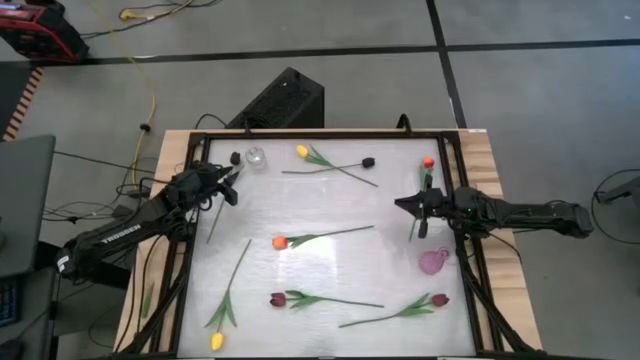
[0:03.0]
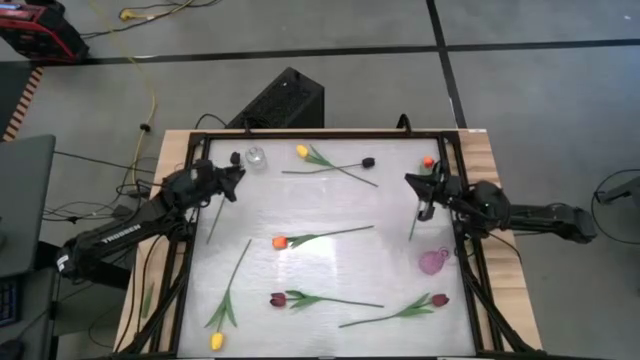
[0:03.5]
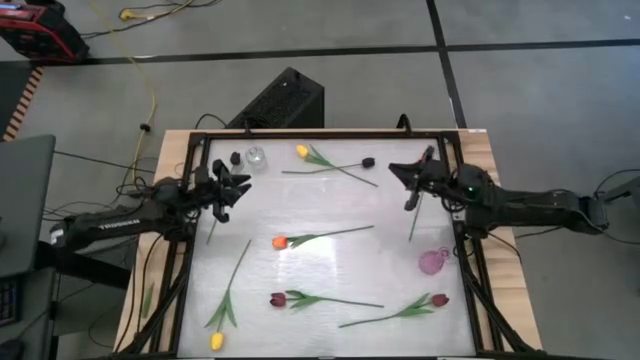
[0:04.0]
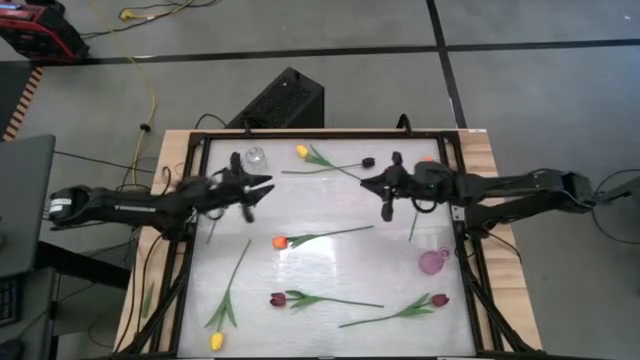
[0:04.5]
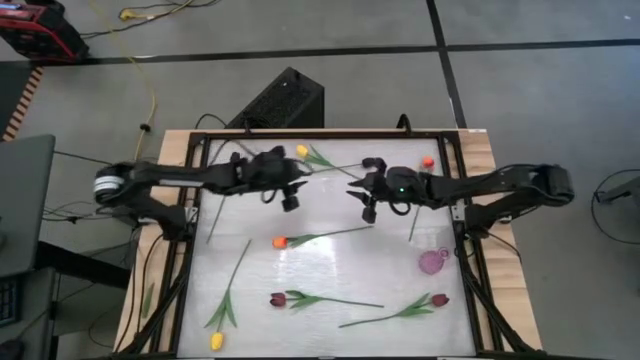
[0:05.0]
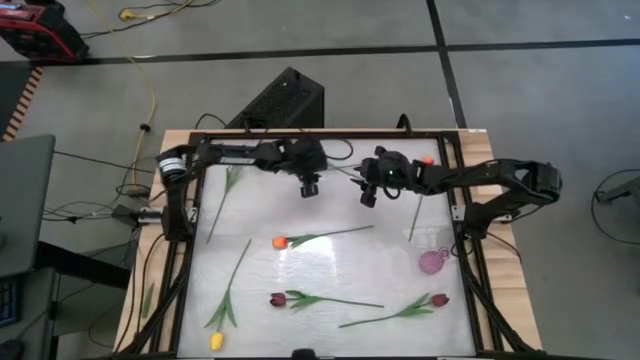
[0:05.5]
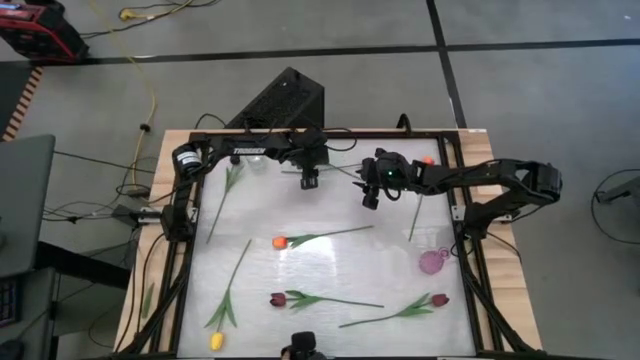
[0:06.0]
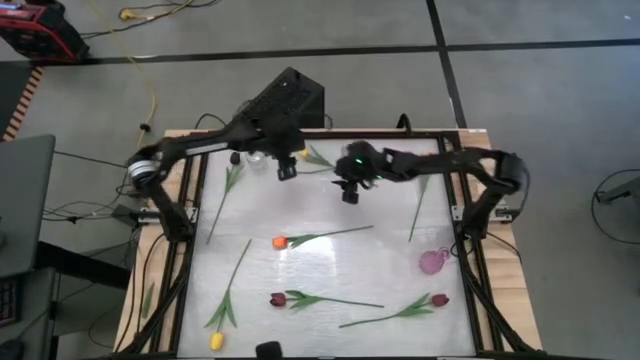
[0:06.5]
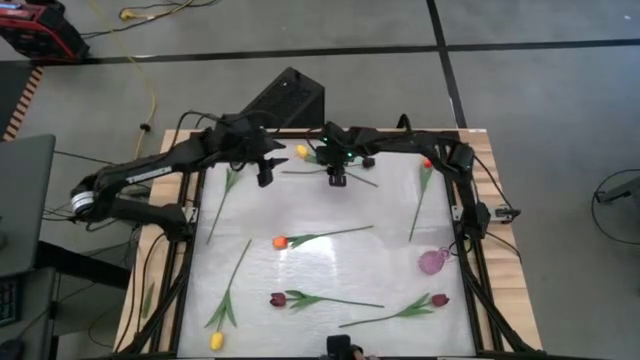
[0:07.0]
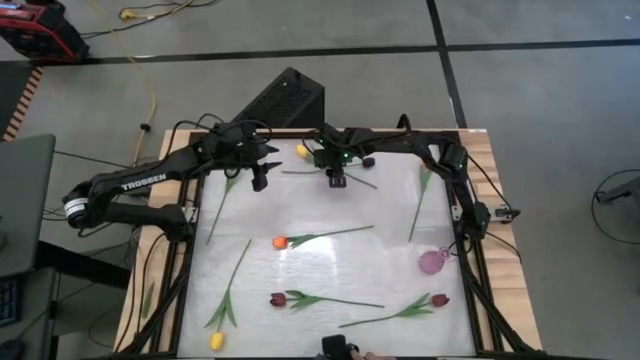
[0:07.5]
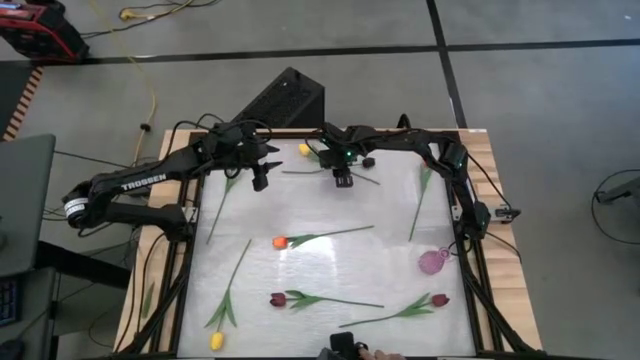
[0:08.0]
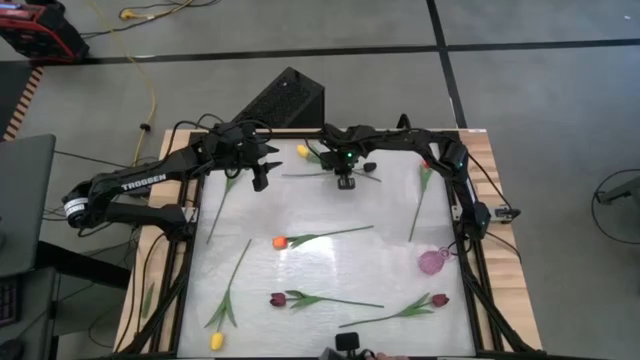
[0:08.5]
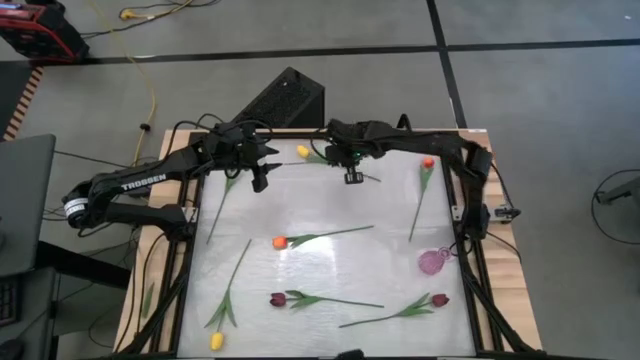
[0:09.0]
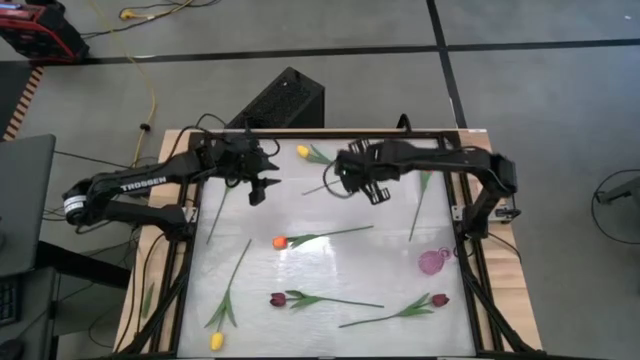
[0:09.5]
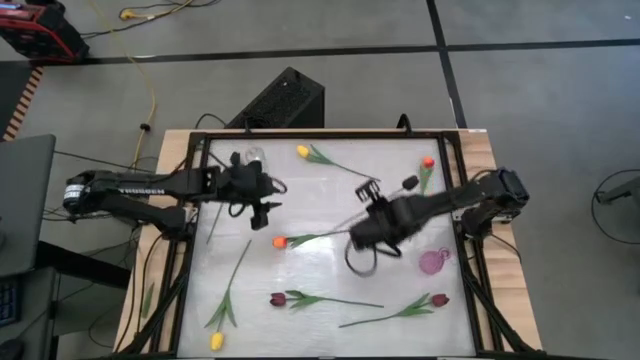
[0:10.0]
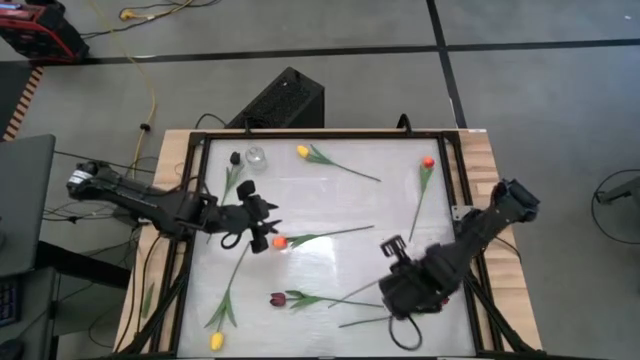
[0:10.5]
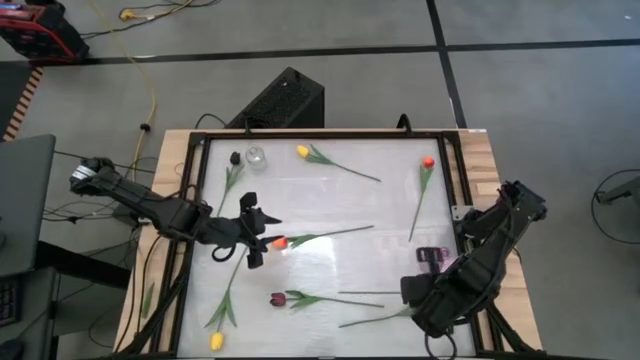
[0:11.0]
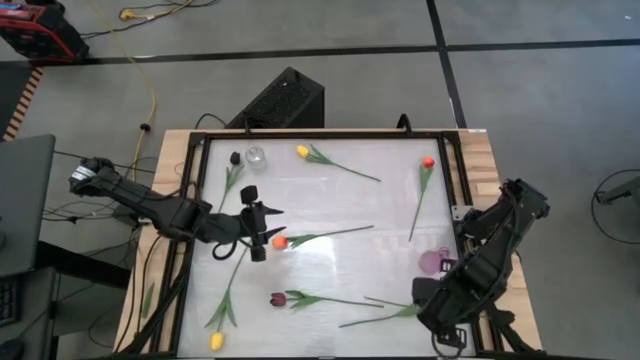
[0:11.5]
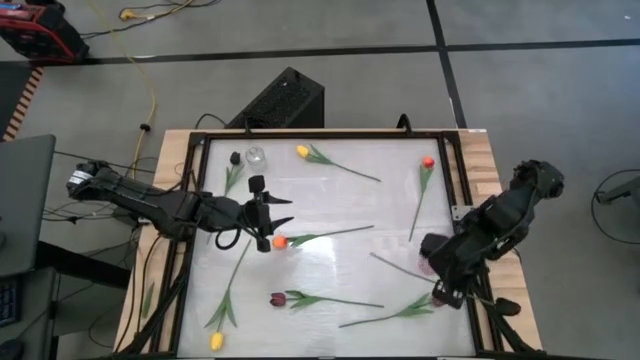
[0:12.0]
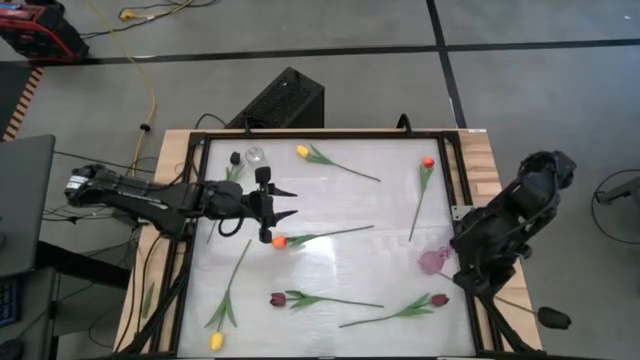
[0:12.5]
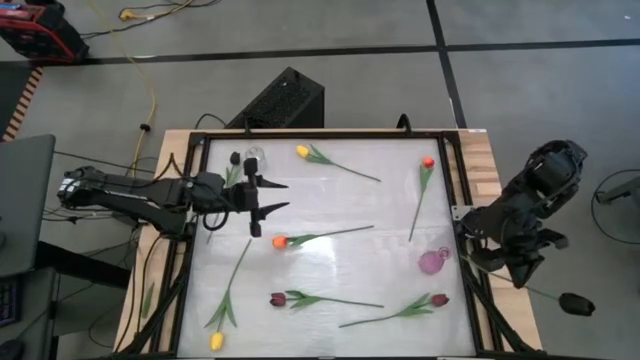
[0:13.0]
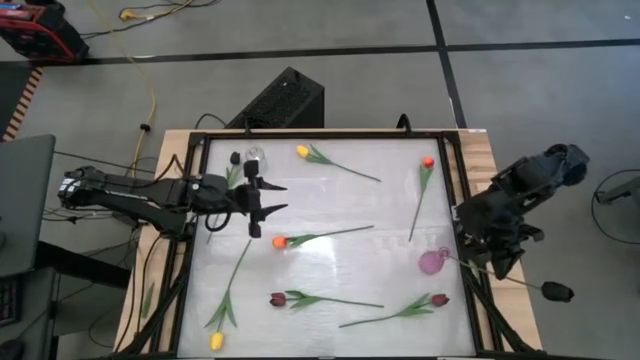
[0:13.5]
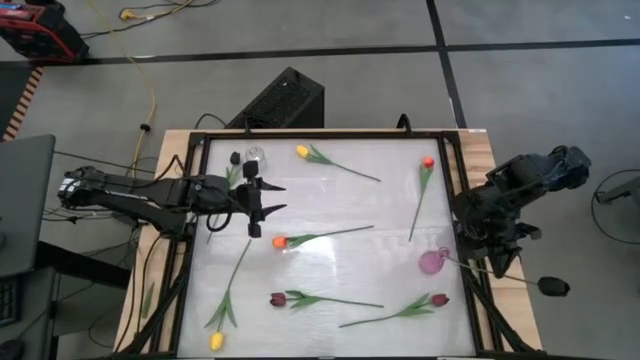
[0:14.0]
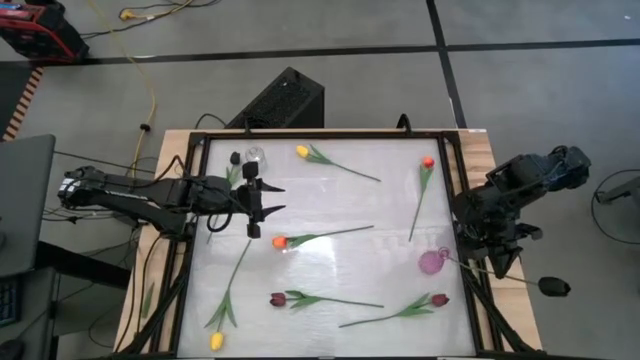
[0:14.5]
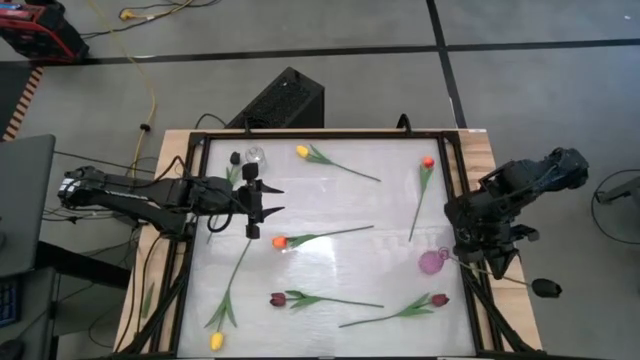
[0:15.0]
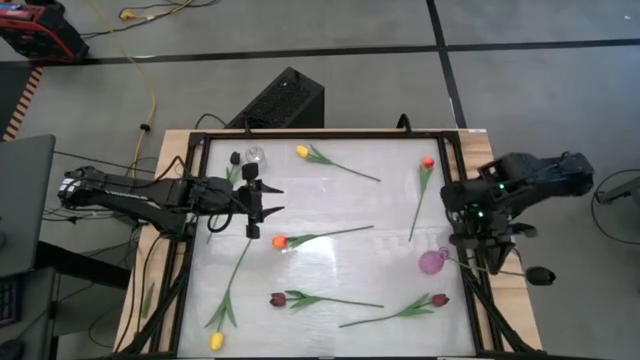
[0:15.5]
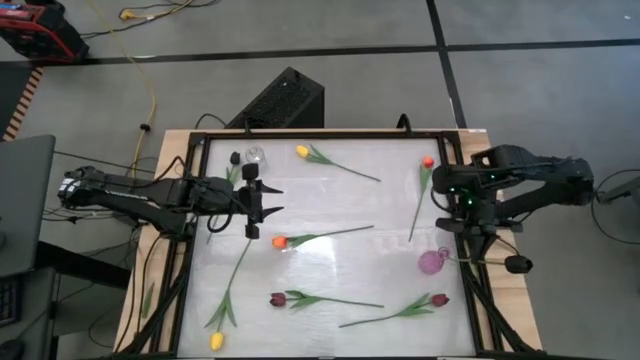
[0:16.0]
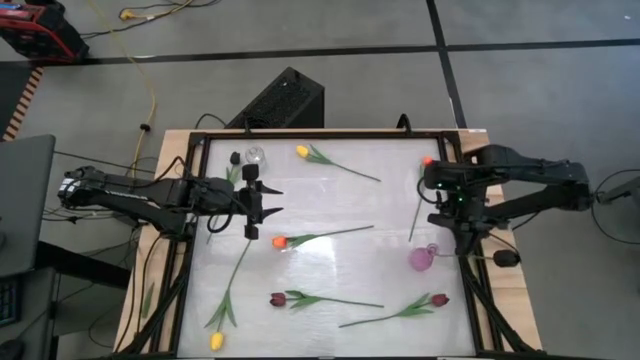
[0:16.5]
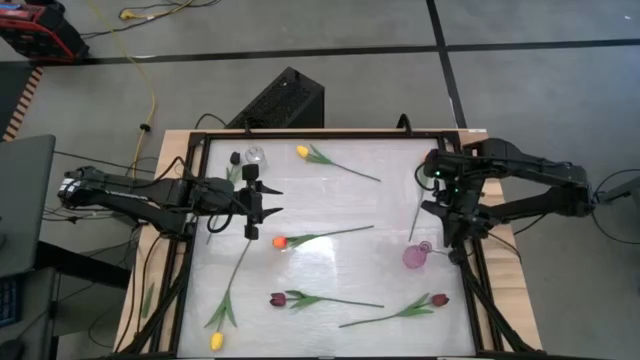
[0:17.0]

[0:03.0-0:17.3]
Task: Sort flowers into vase by color
Put the right black flower into the pink vase

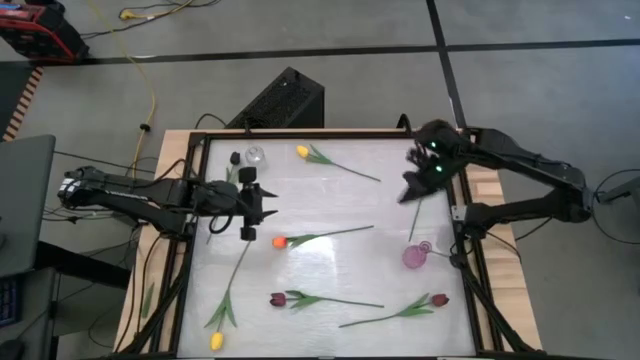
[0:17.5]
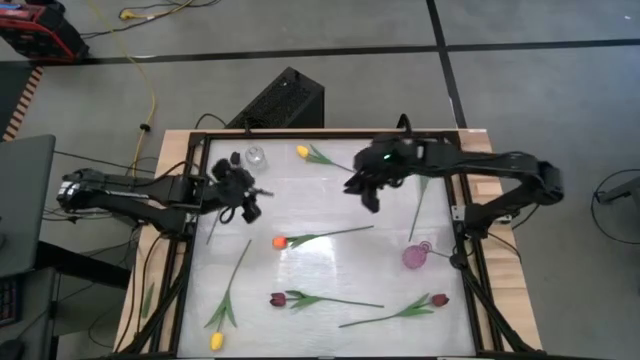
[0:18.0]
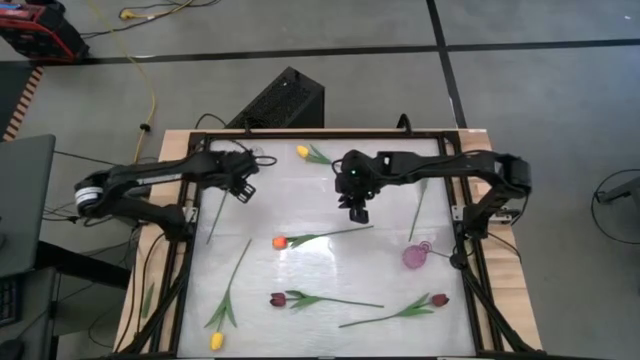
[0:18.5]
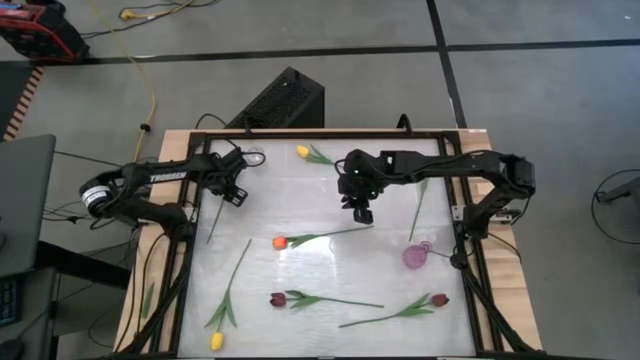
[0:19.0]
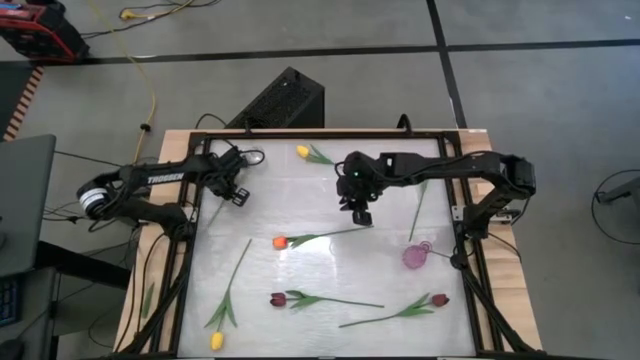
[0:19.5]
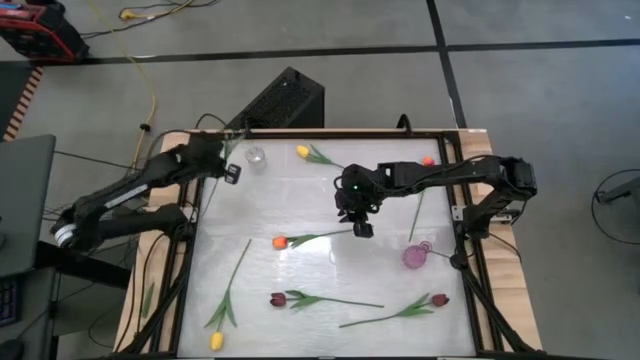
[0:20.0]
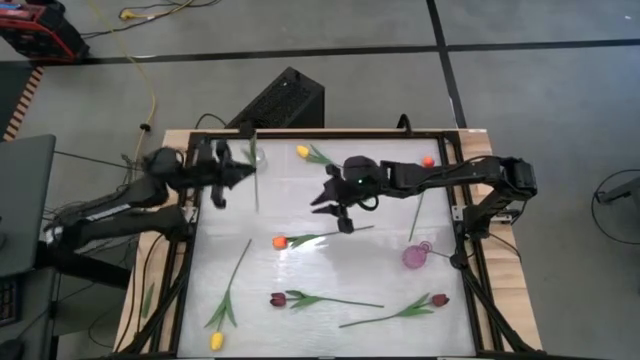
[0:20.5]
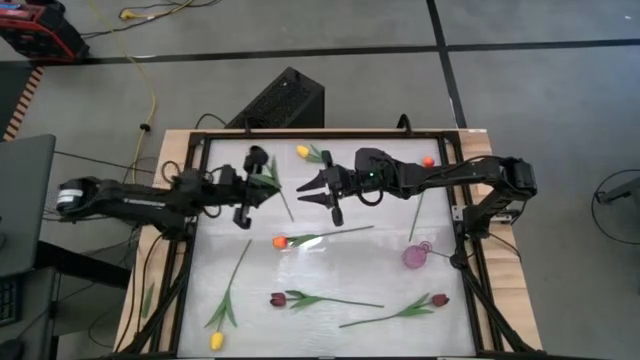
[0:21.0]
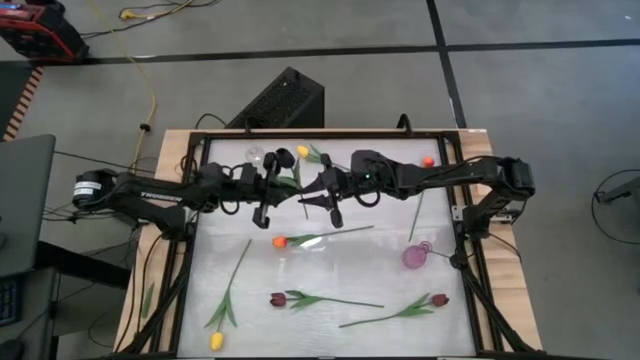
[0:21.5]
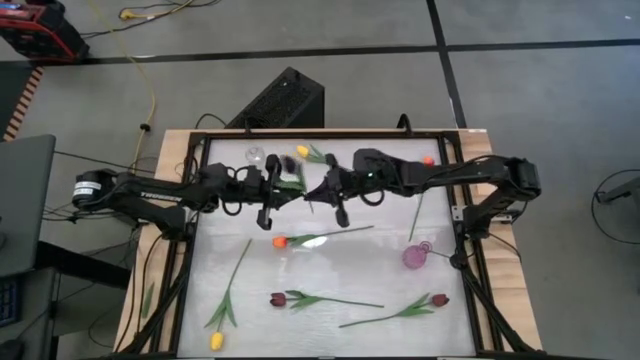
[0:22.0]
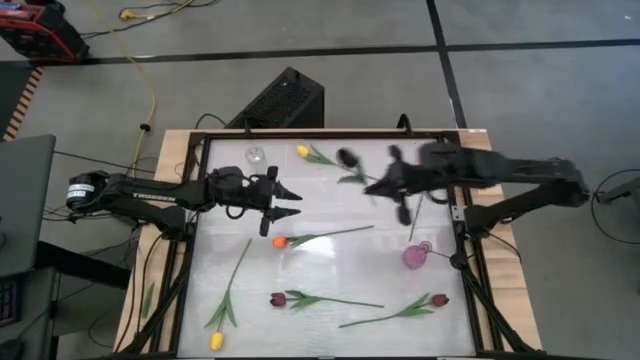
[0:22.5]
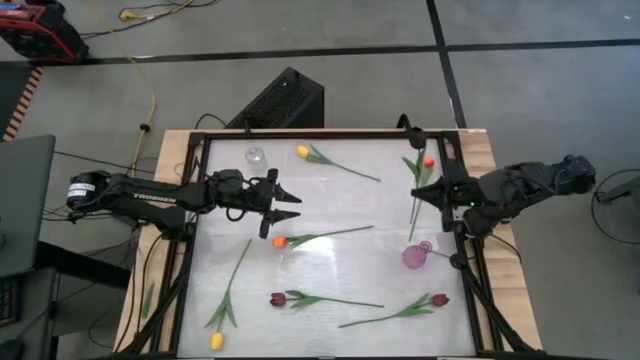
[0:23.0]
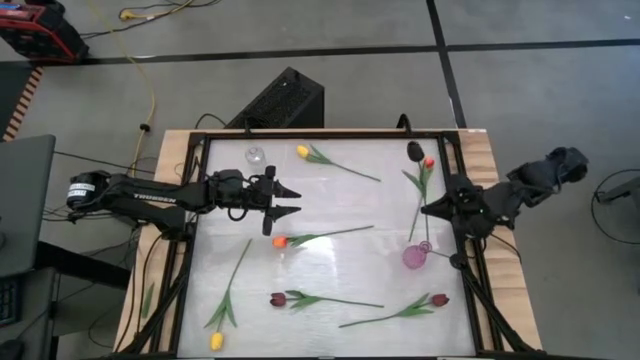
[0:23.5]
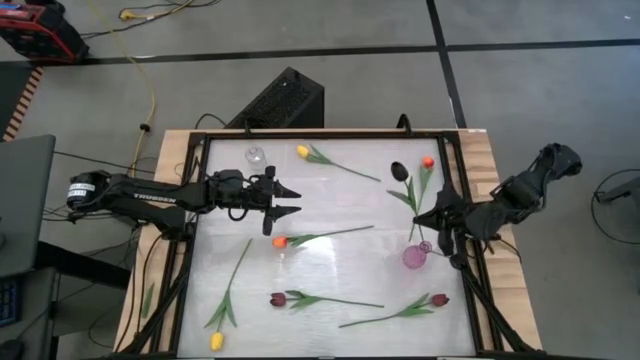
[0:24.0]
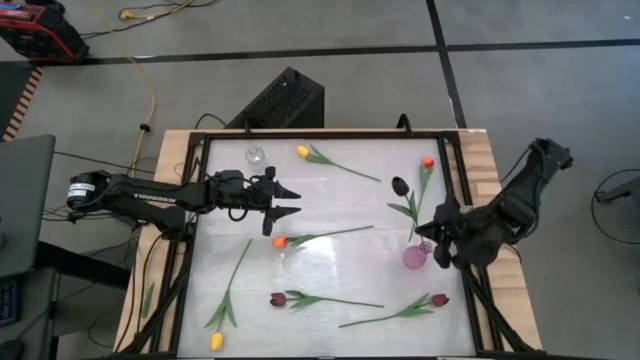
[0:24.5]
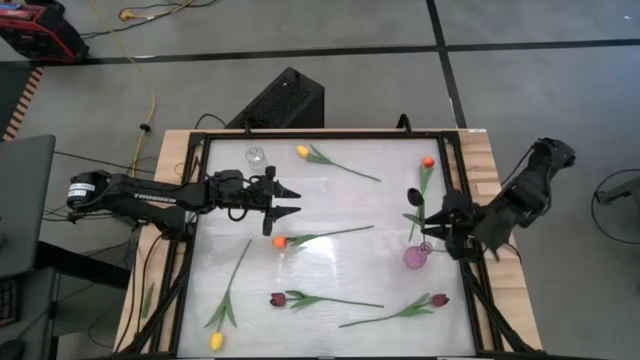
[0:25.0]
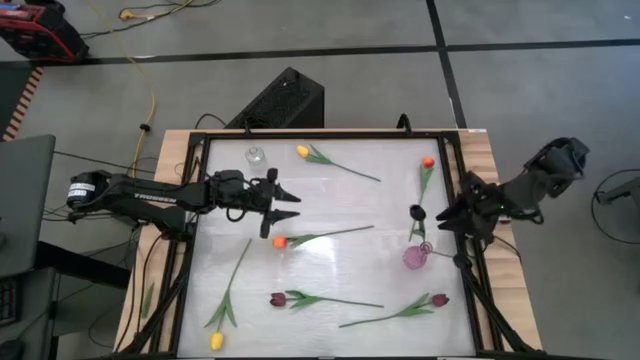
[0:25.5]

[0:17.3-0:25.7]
Put the black flower into the pink vase
